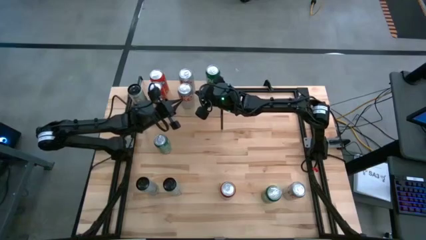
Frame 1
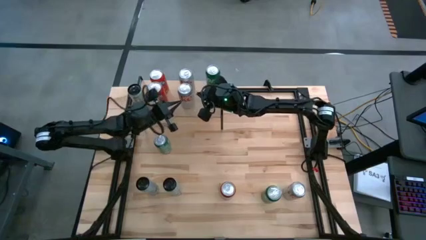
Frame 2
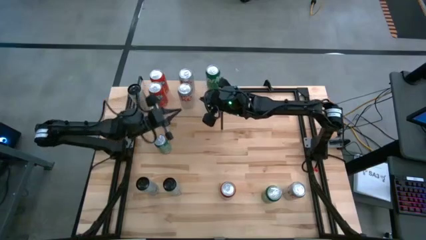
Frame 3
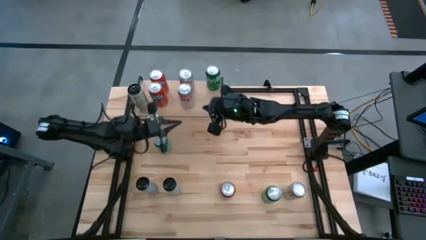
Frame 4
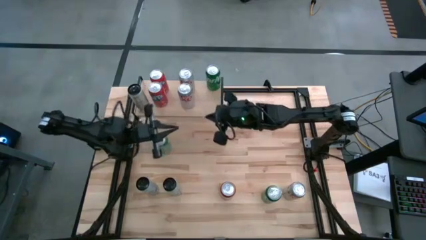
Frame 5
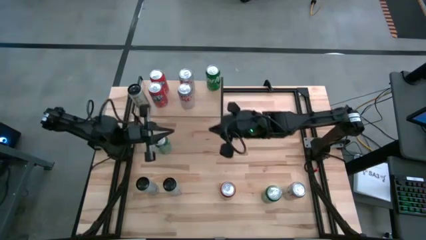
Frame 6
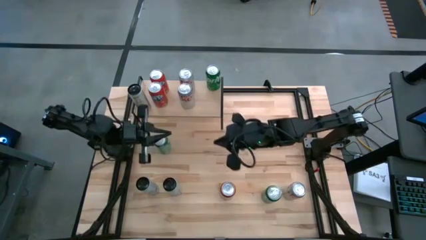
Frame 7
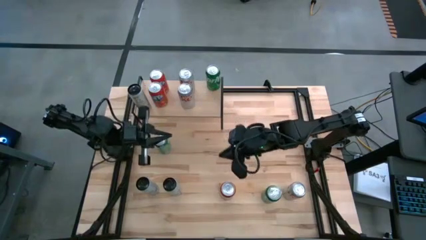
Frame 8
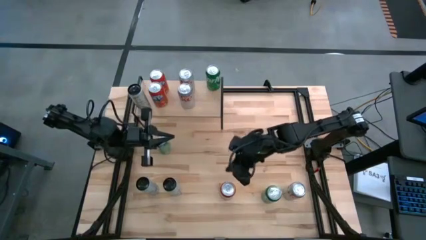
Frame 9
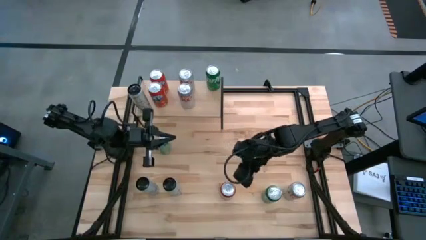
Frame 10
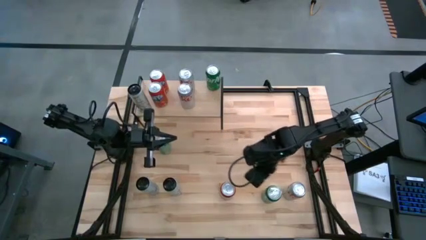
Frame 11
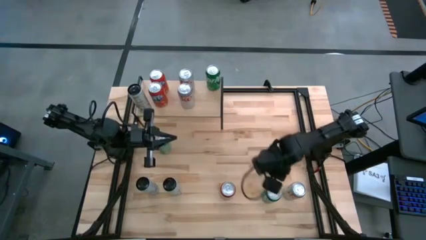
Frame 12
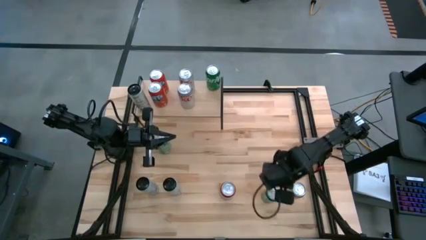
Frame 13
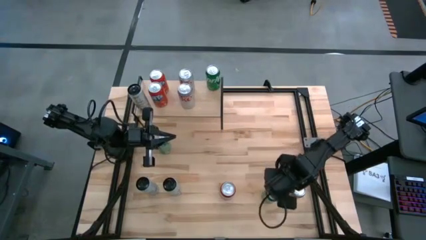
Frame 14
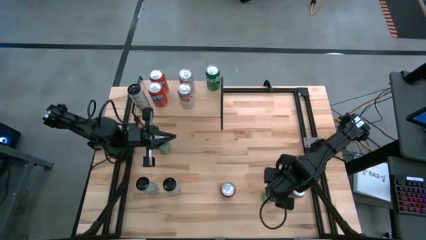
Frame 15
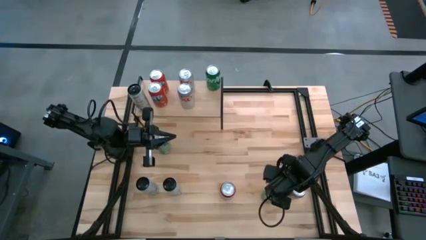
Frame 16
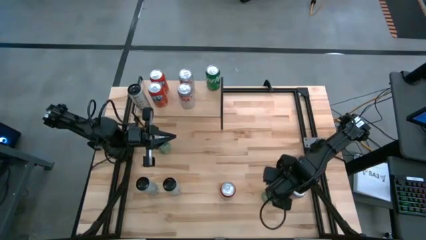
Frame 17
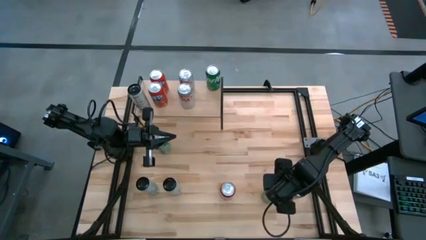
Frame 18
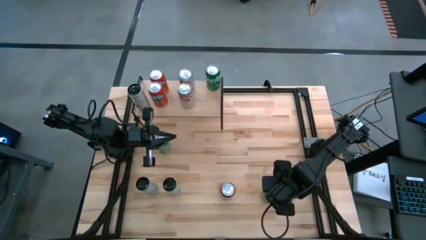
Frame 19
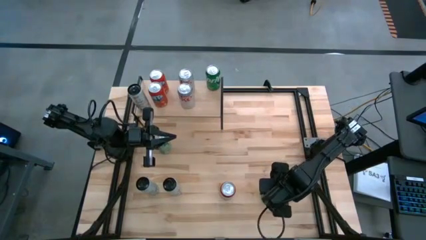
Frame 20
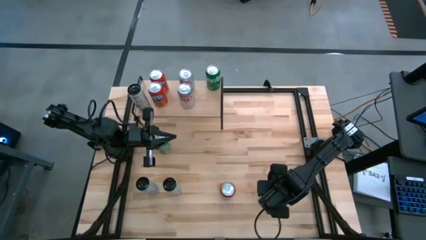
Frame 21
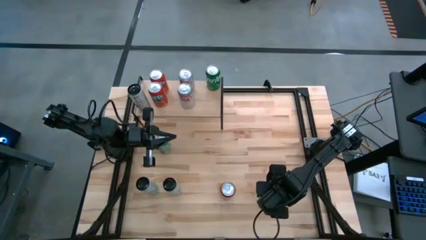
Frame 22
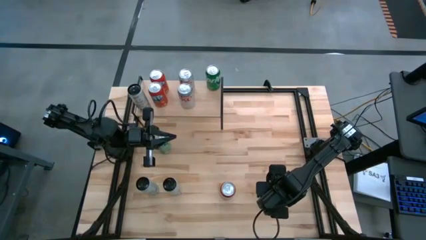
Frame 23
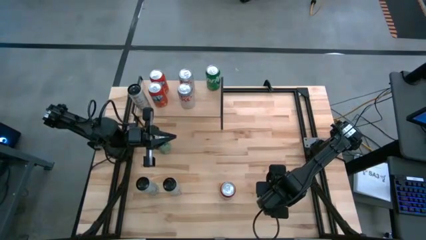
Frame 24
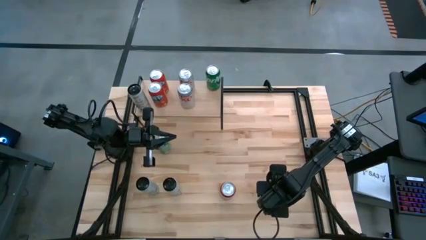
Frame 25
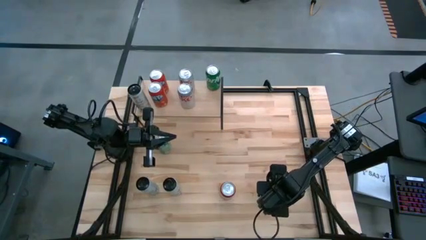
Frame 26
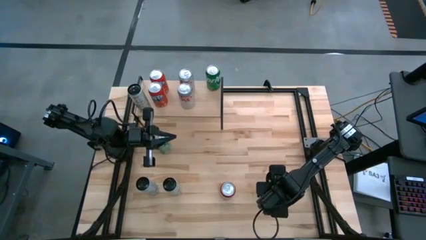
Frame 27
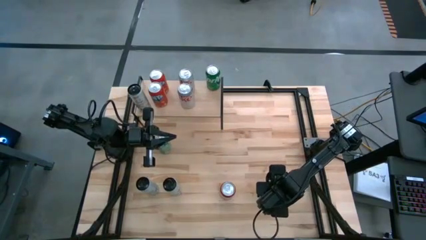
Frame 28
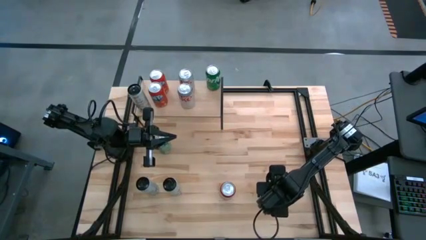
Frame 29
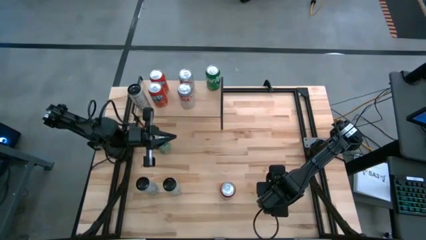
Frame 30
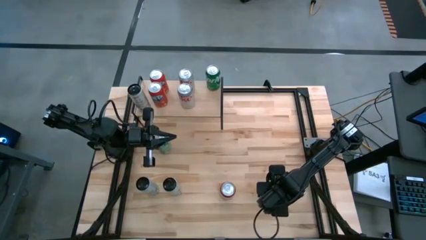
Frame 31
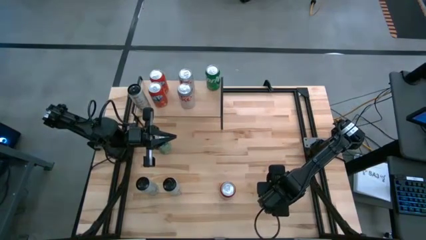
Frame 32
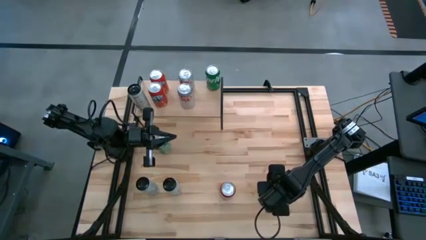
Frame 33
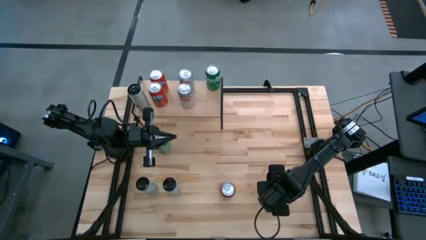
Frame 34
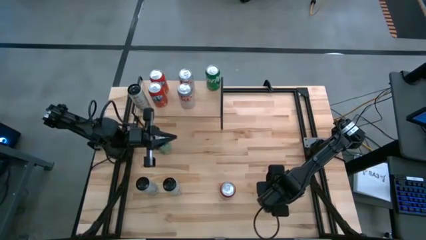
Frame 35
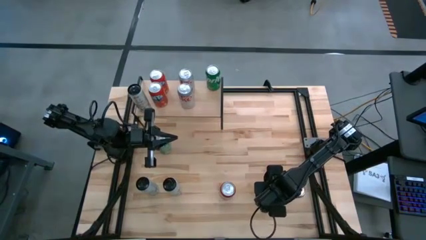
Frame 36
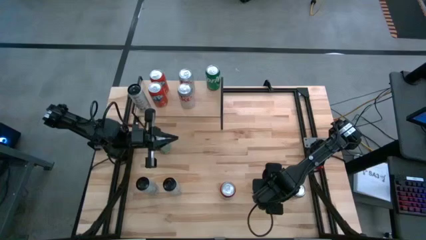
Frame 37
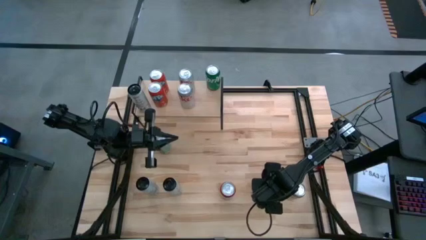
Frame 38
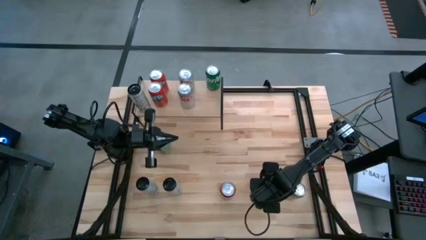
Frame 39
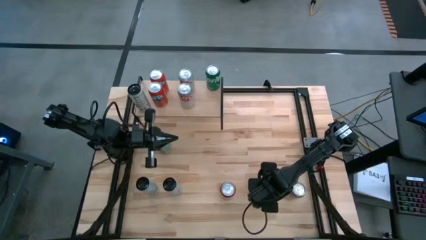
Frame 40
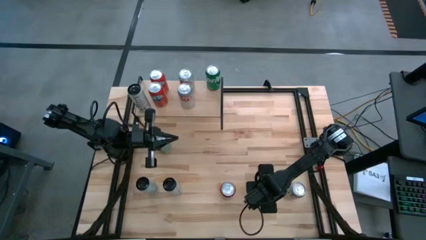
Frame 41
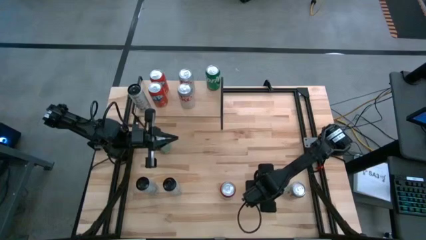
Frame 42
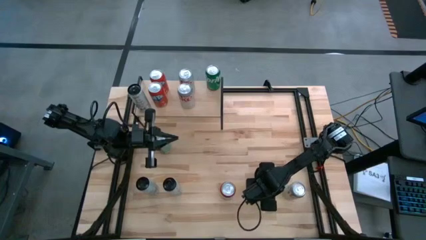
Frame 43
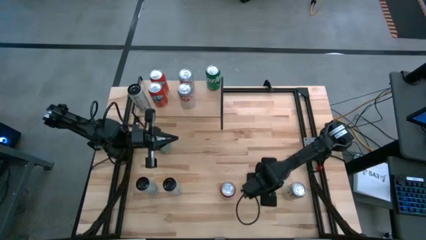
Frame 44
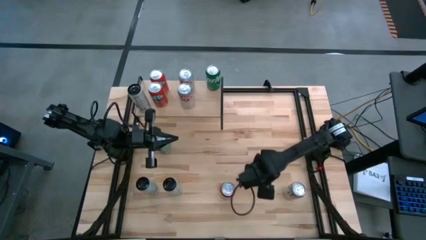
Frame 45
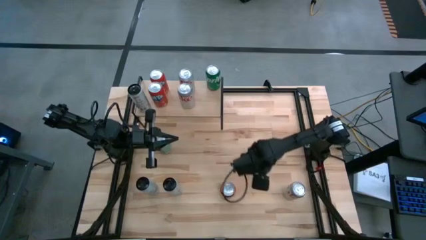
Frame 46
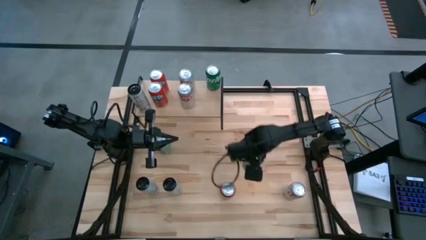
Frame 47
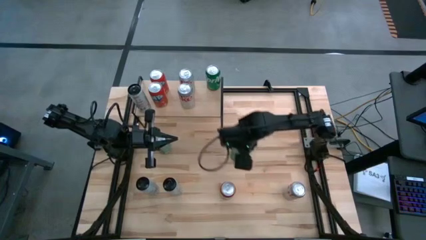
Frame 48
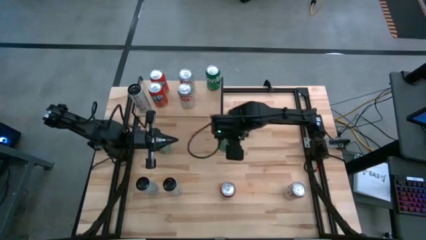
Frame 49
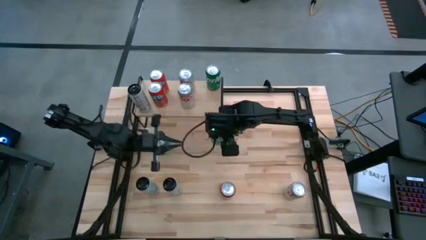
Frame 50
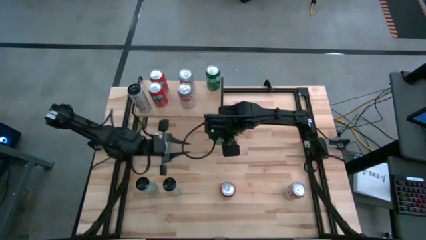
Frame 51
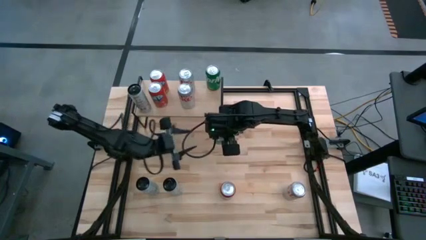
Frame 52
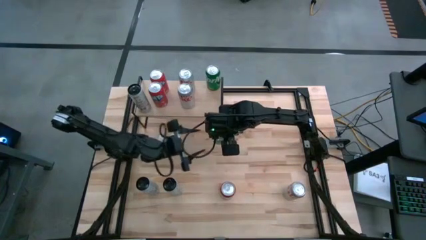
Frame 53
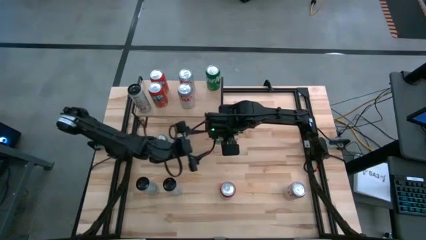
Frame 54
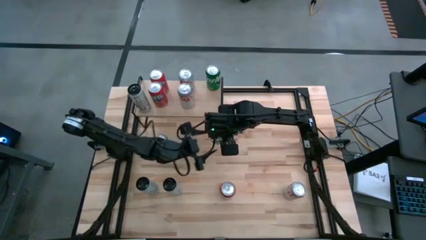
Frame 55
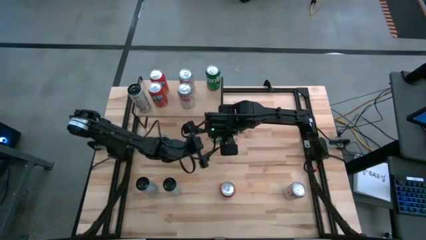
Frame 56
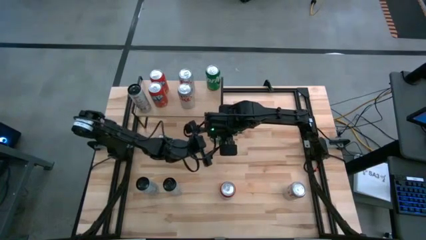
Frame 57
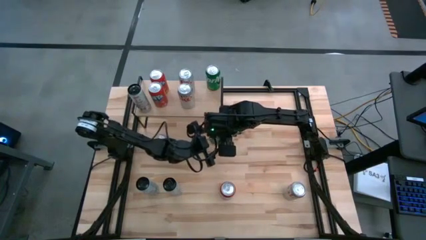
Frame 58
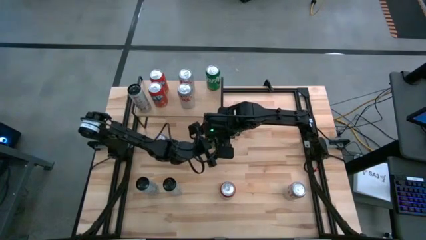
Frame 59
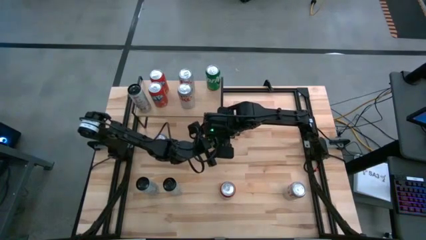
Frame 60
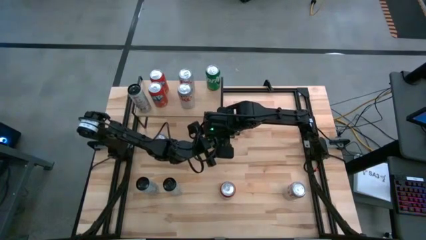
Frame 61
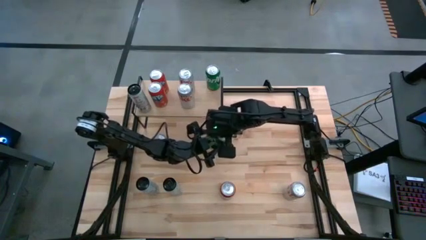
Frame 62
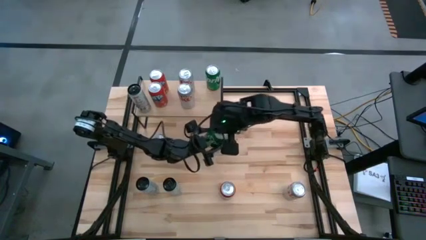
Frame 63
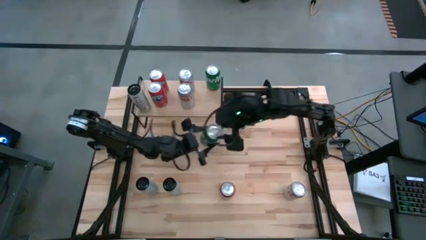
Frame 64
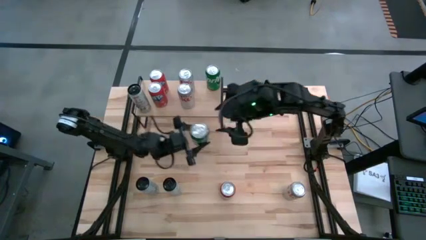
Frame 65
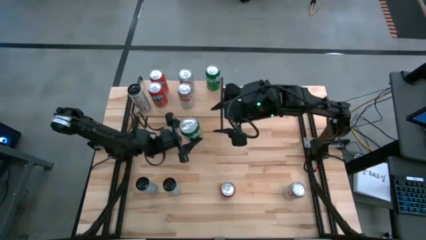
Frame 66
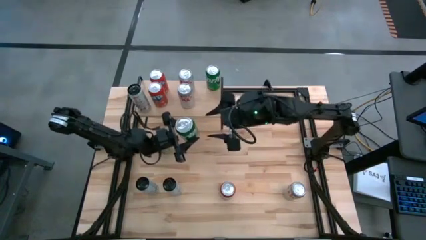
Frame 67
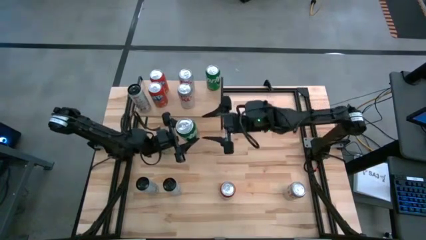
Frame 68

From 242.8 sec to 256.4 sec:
Task: Place canned beverage on shelf
Put the bottom green soda can aligned with the other green soda can on the shelf
